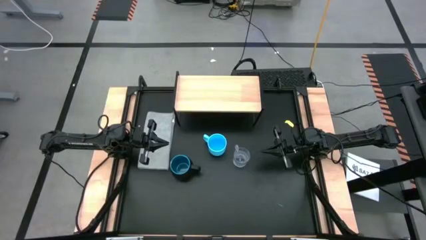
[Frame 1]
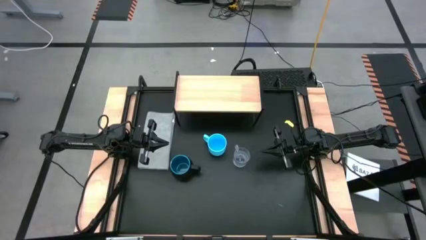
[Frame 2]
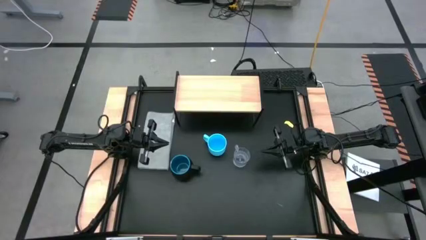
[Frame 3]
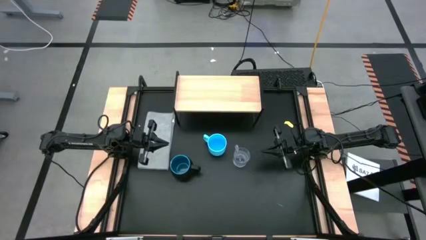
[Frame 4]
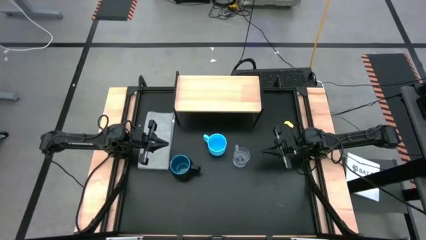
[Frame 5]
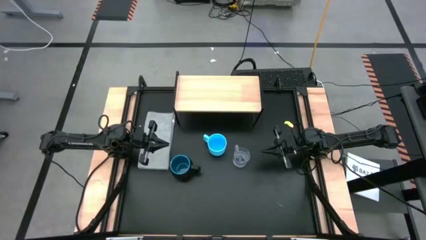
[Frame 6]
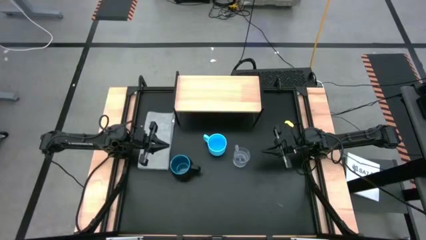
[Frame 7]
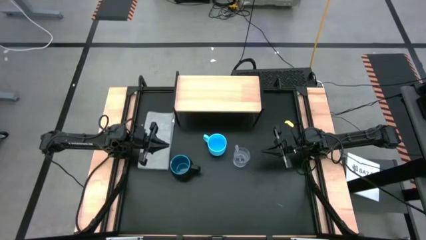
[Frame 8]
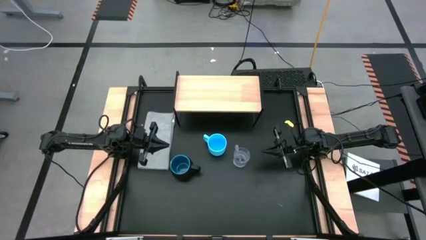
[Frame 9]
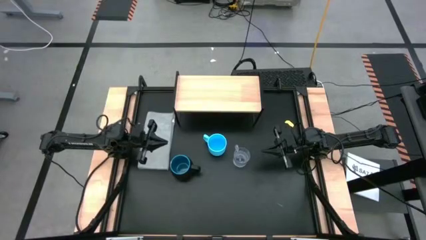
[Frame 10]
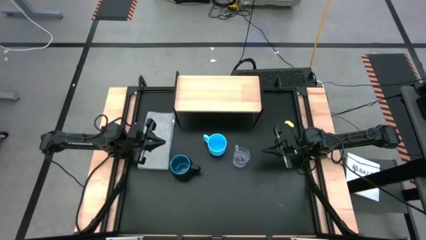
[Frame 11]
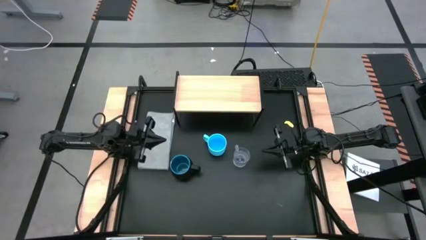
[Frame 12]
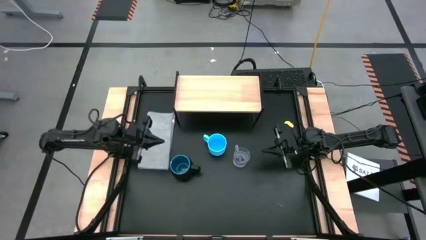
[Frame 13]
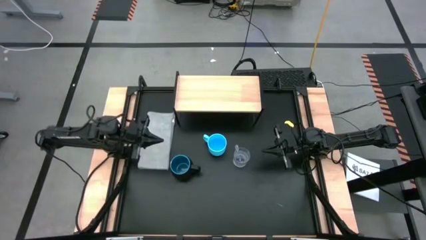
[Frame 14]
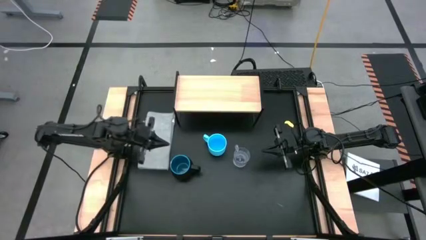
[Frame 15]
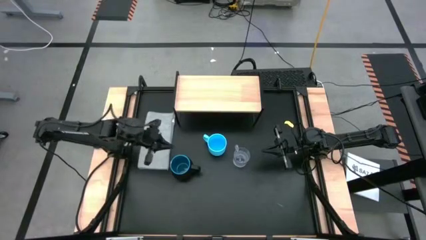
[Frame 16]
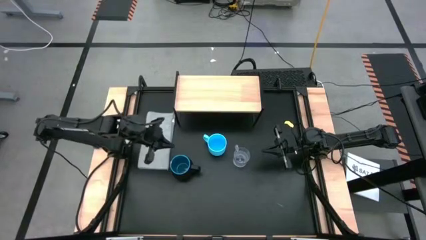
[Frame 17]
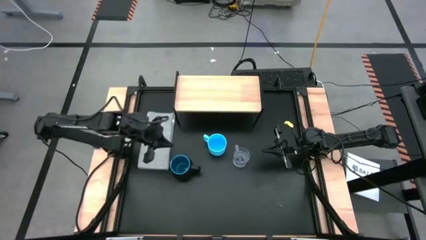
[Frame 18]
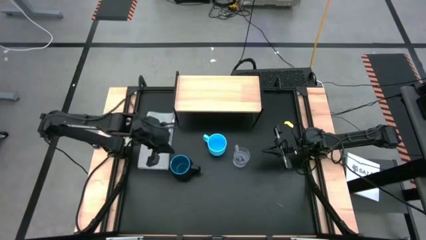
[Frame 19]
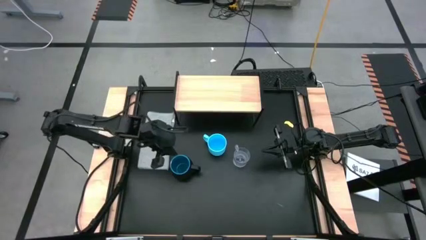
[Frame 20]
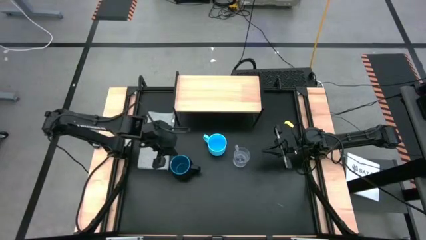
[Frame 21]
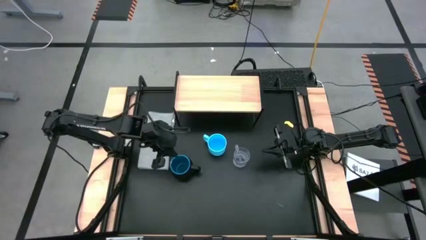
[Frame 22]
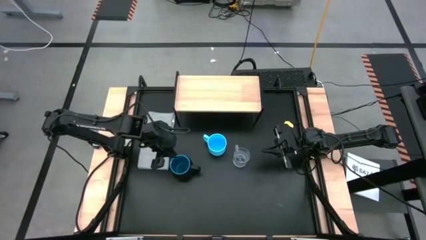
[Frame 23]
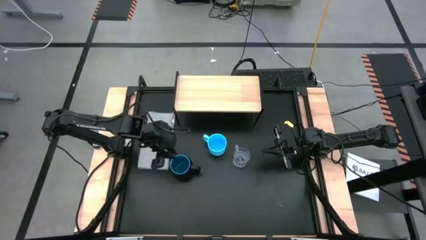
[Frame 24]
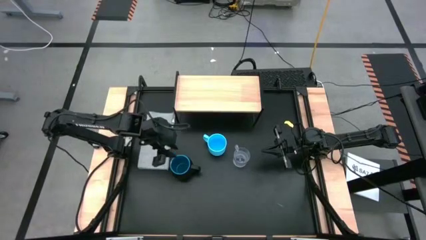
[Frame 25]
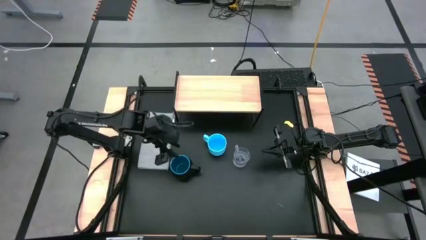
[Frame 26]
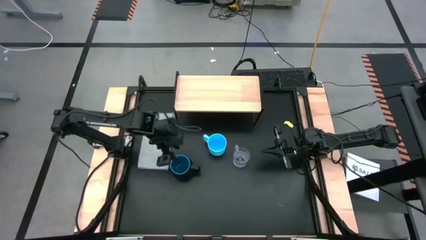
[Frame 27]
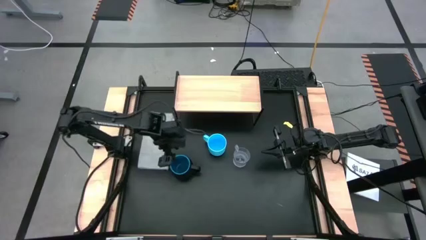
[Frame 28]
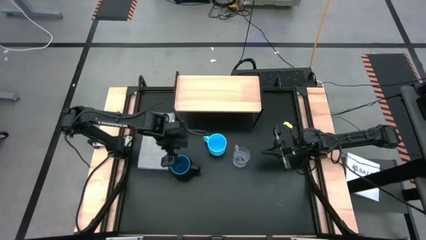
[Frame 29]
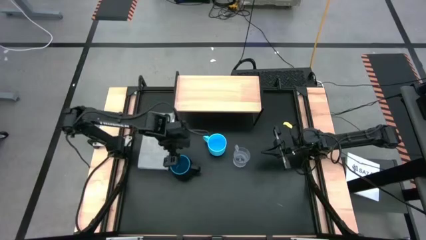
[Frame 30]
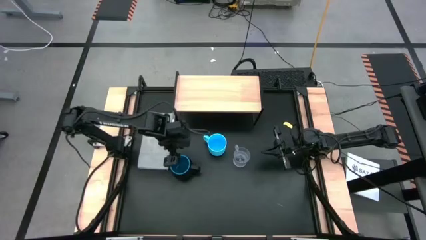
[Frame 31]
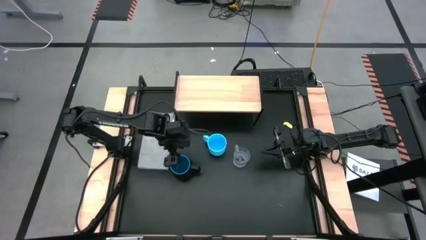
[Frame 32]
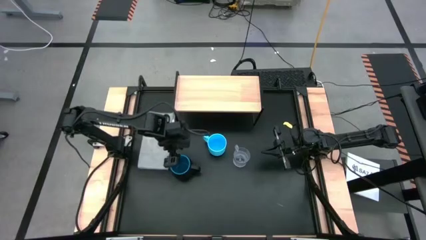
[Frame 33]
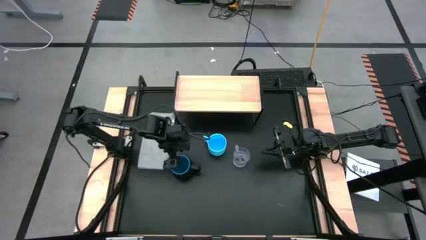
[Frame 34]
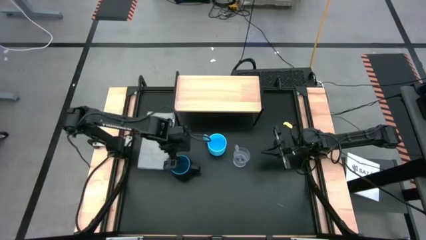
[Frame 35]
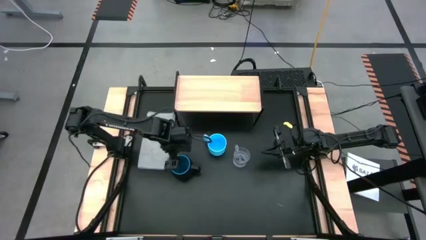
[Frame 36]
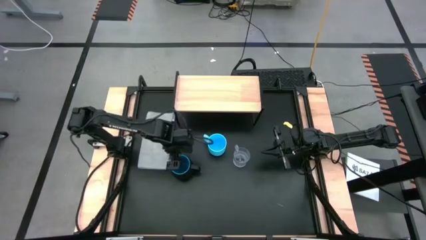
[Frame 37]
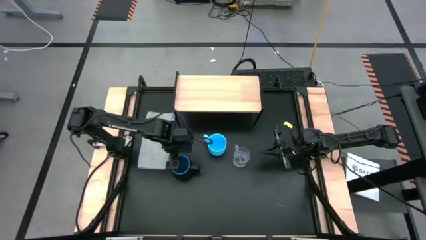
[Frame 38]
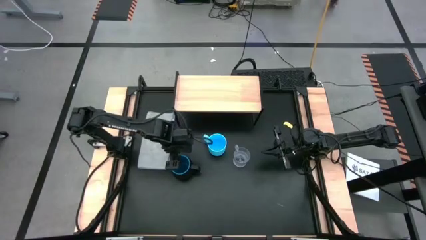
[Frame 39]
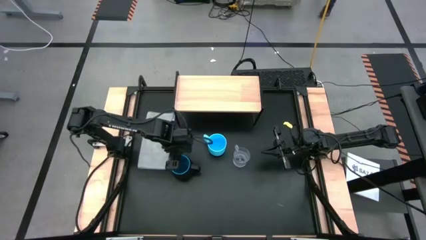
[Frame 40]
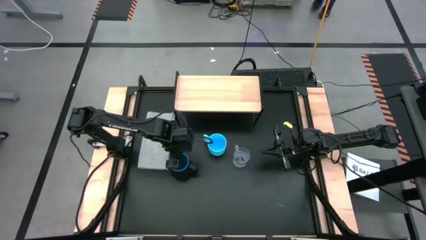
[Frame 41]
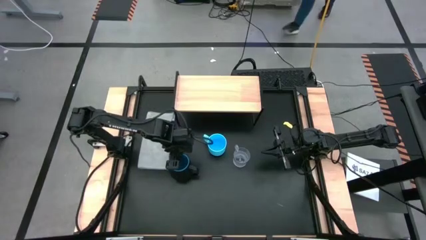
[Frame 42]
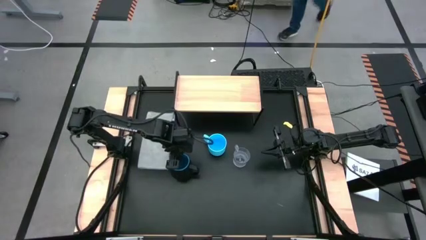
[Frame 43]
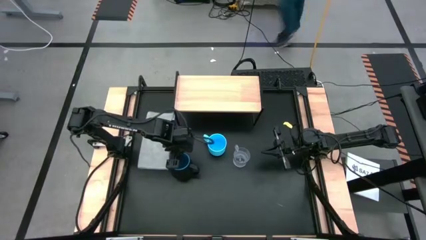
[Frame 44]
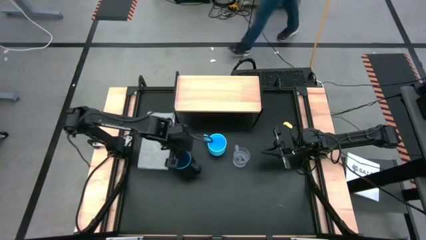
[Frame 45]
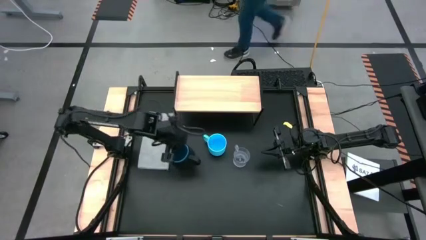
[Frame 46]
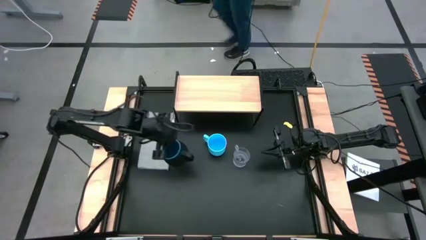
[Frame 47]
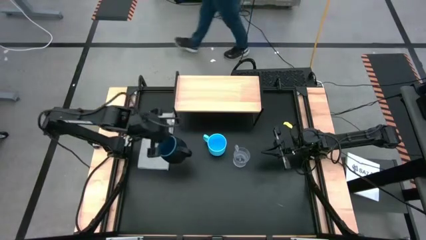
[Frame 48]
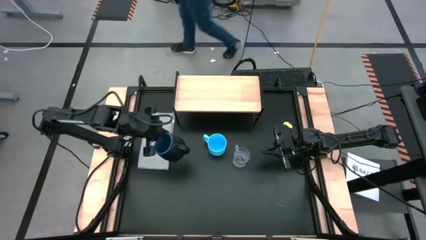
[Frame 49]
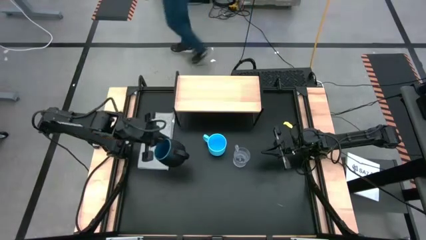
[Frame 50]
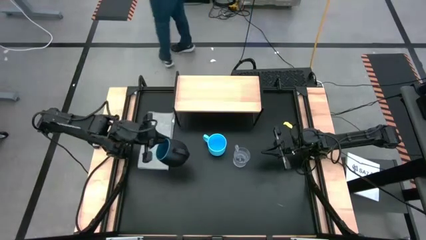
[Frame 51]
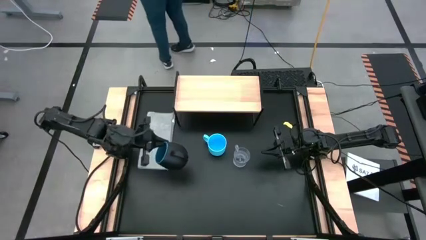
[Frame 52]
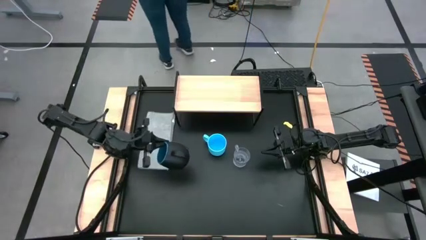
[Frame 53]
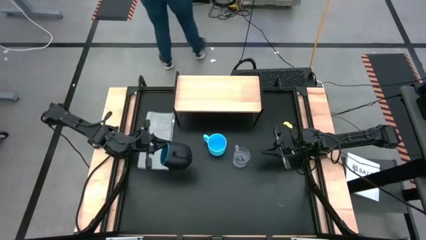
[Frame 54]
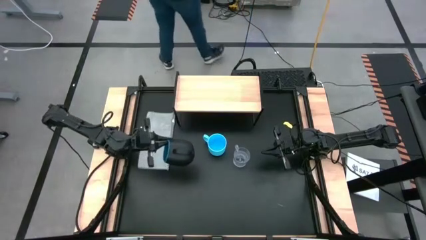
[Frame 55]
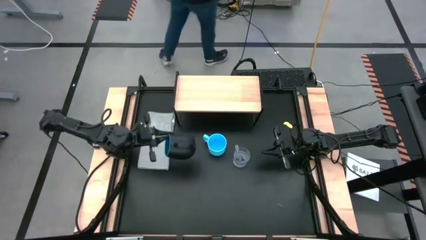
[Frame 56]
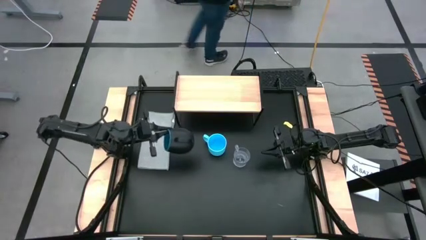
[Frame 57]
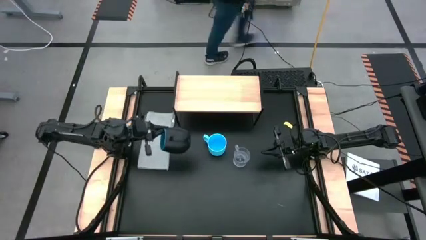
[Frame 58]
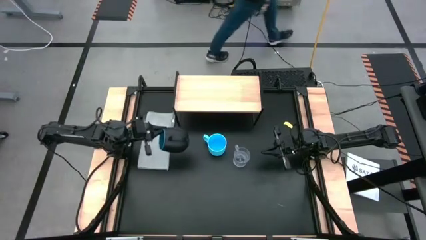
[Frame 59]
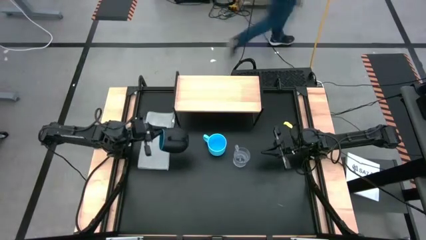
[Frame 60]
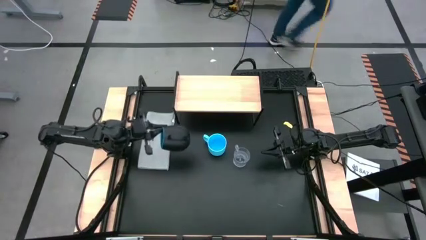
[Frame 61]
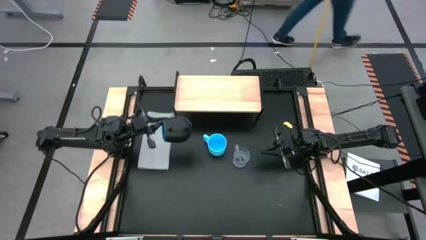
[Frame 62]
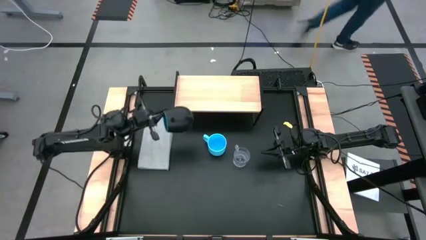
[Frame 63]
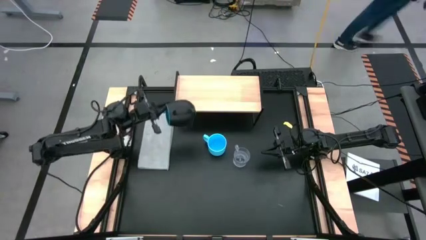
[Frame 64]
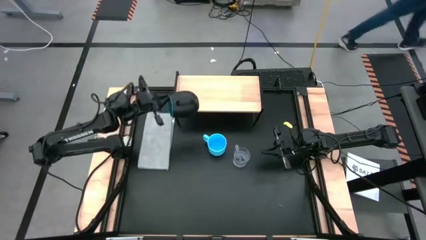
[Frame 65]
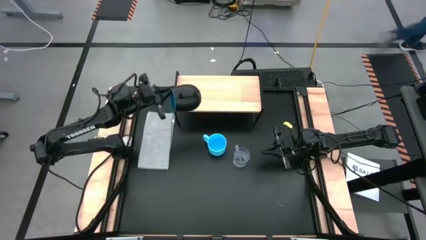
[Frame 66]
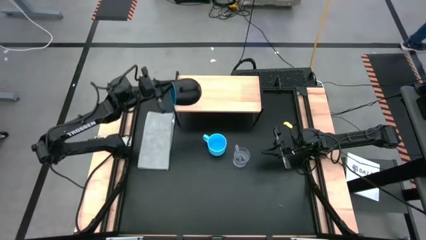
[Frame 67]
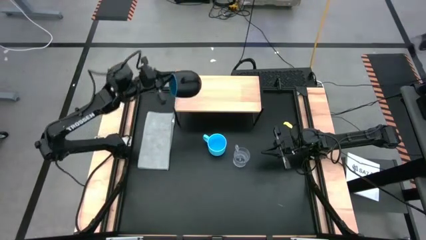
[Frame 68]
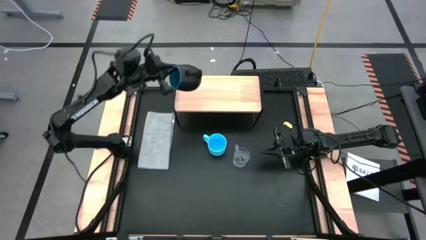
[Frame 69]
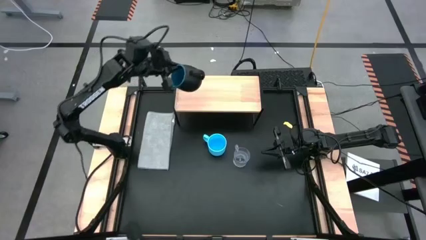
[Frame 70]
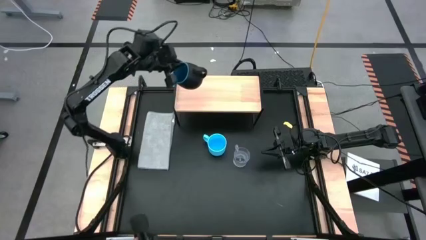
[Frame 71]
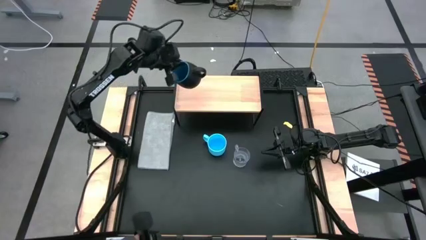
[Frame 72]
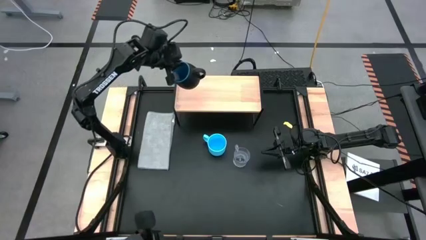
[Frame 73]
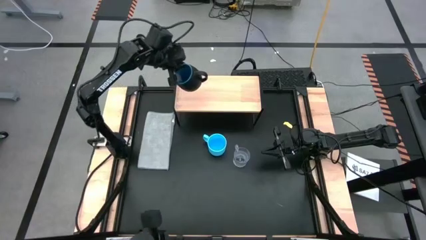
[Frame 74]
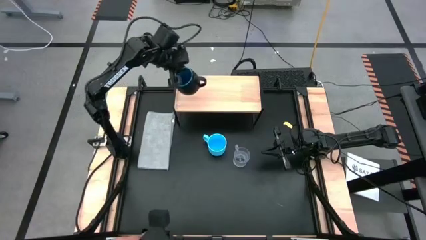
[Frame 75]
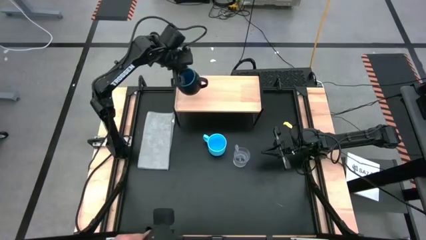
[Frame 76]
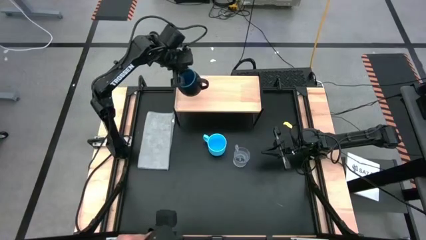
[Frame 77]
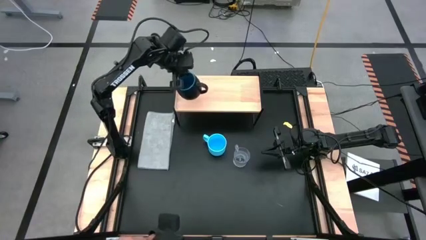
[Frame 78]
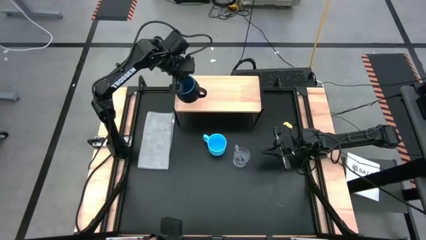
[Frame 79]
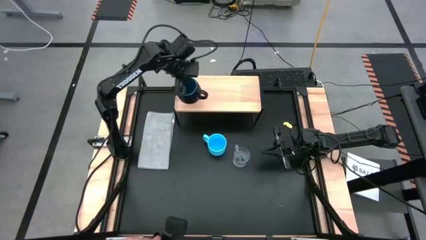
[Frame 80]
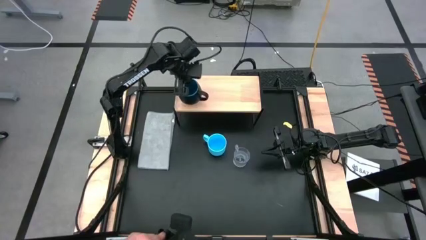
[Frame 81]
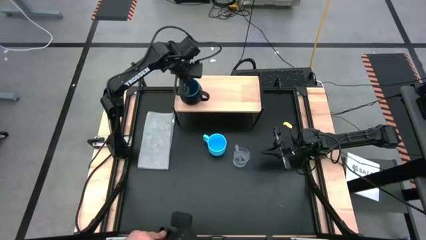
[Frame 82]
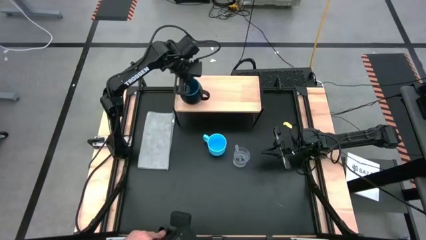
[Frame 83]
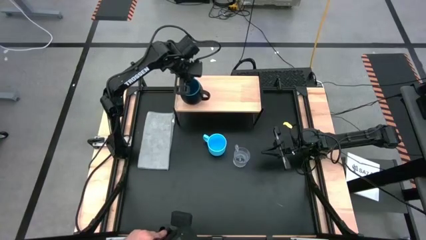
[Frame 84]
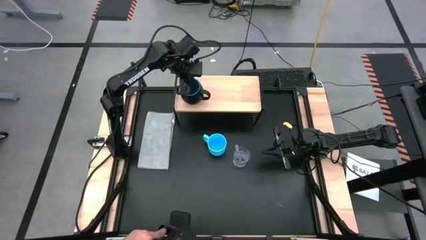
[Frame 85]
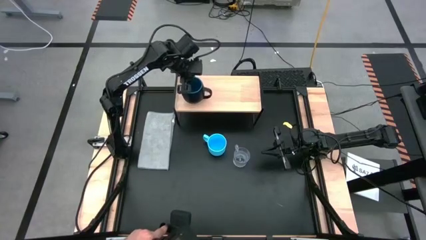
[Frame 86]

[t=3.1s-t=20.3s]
Task: Stack small to large cups/mugs on shelf
Put the black cup on the shelf
